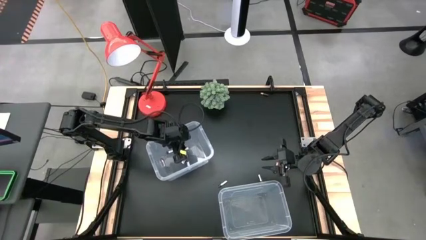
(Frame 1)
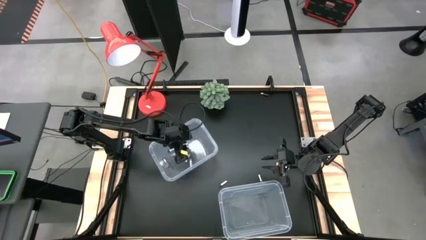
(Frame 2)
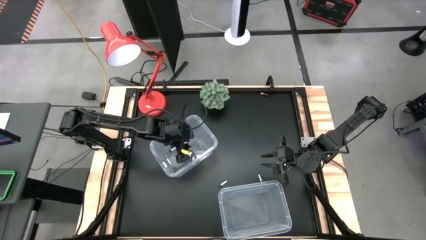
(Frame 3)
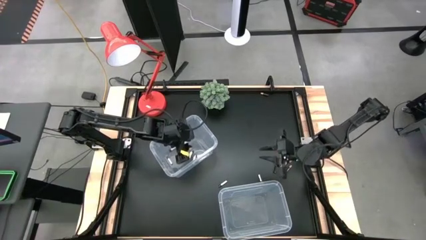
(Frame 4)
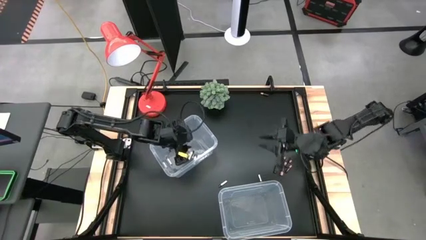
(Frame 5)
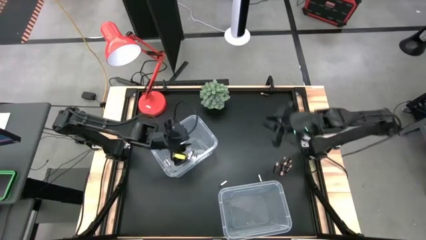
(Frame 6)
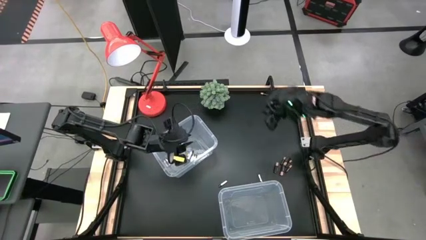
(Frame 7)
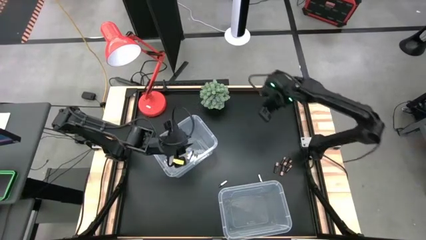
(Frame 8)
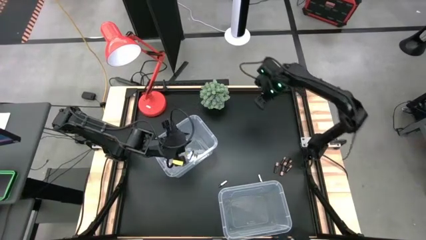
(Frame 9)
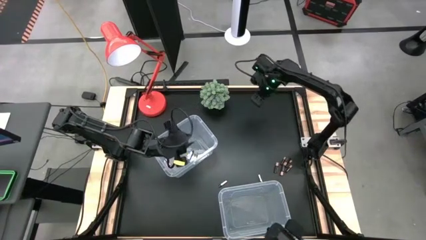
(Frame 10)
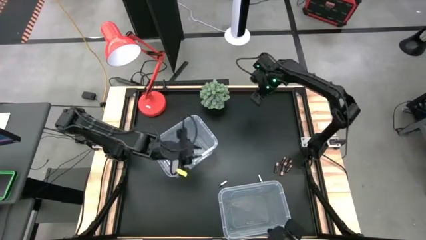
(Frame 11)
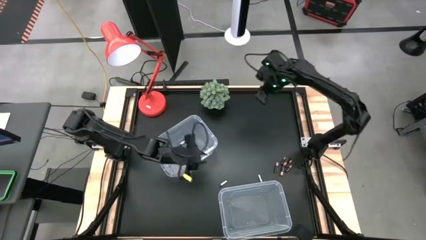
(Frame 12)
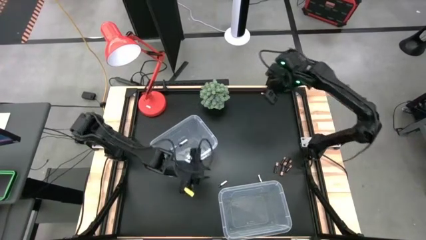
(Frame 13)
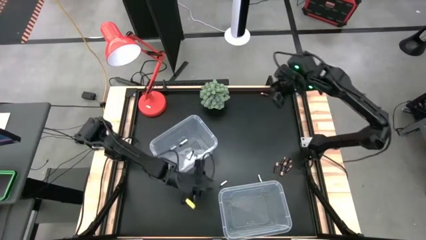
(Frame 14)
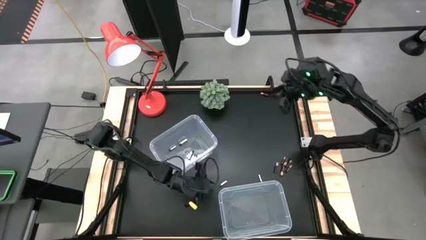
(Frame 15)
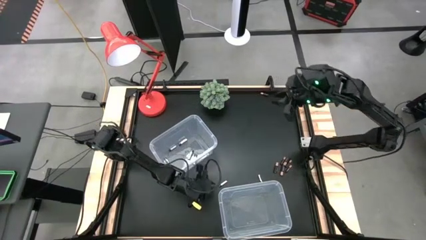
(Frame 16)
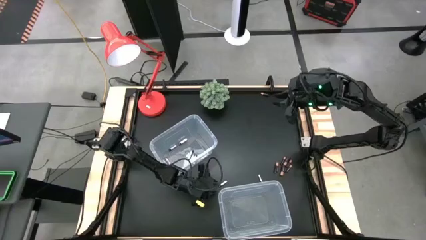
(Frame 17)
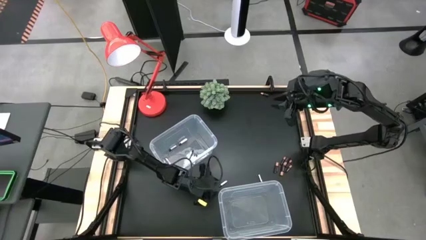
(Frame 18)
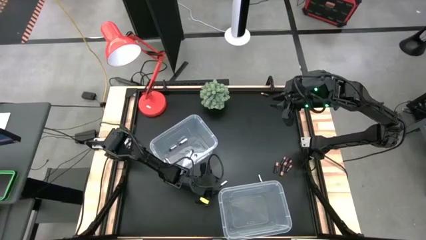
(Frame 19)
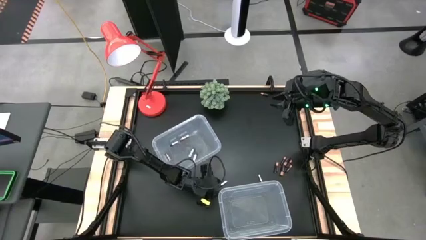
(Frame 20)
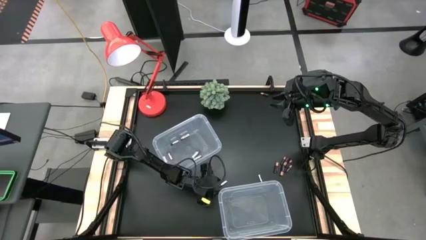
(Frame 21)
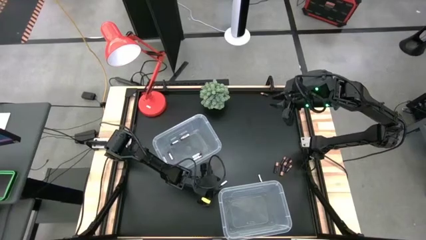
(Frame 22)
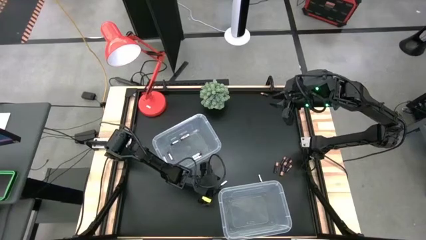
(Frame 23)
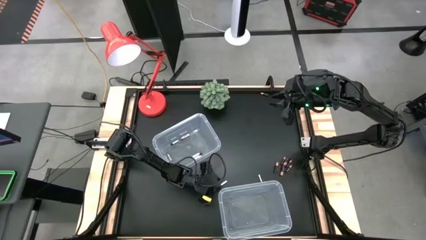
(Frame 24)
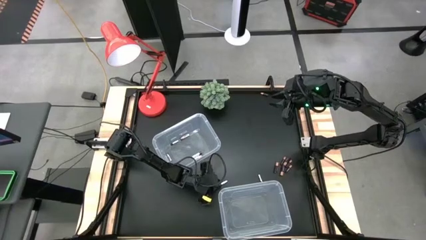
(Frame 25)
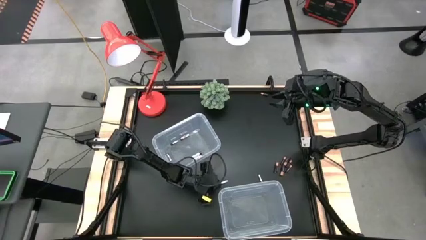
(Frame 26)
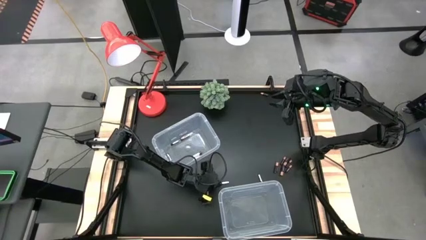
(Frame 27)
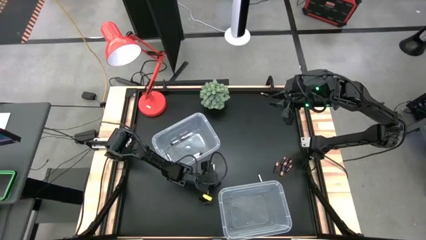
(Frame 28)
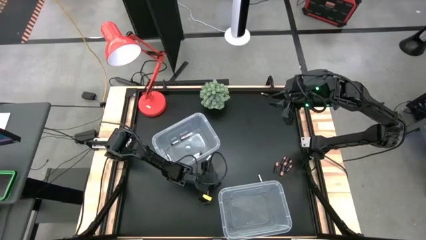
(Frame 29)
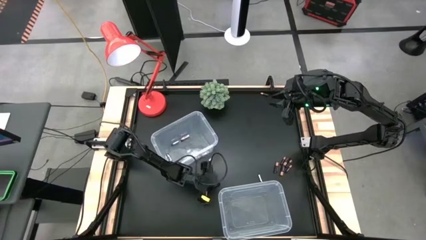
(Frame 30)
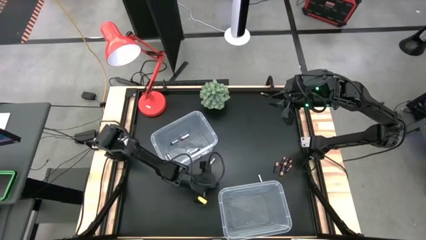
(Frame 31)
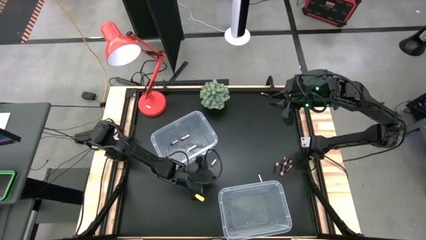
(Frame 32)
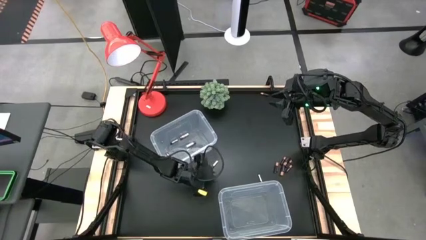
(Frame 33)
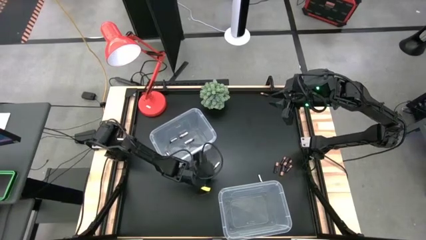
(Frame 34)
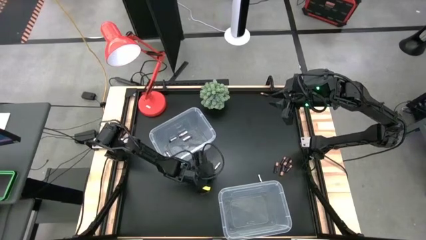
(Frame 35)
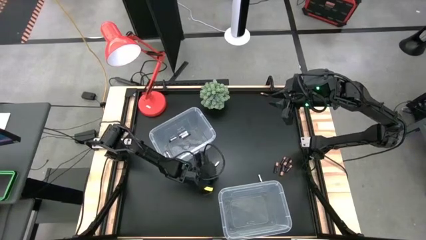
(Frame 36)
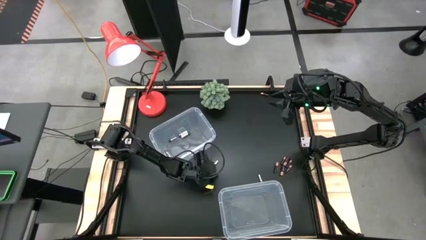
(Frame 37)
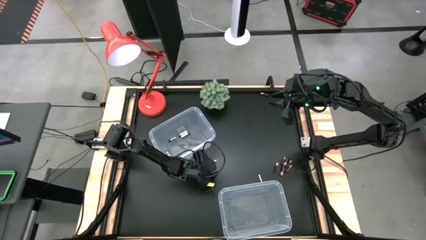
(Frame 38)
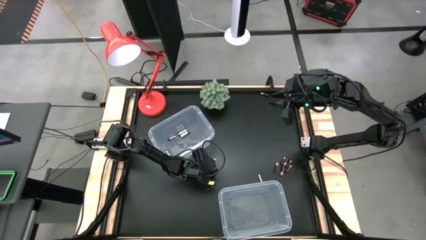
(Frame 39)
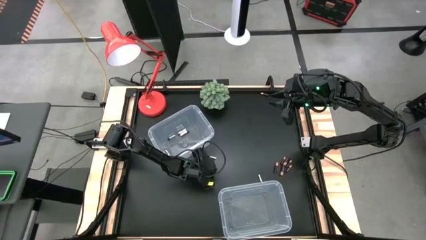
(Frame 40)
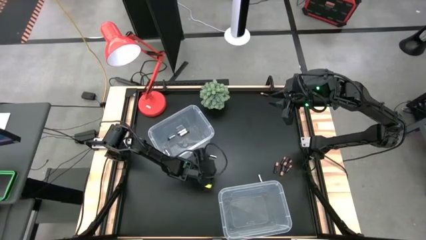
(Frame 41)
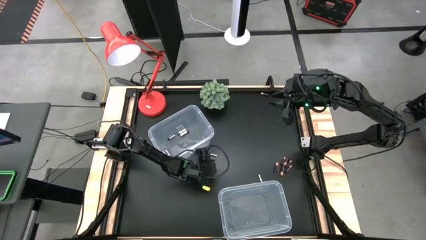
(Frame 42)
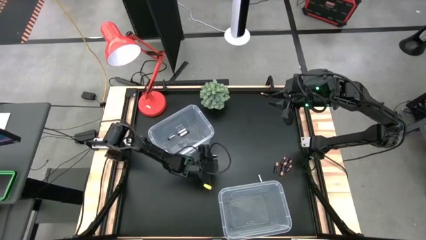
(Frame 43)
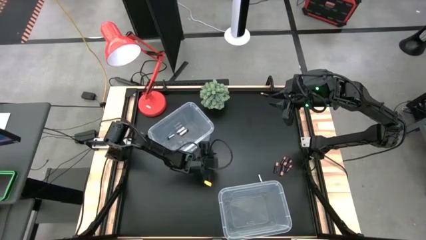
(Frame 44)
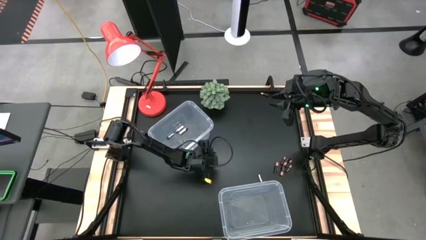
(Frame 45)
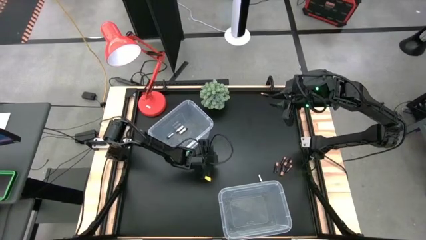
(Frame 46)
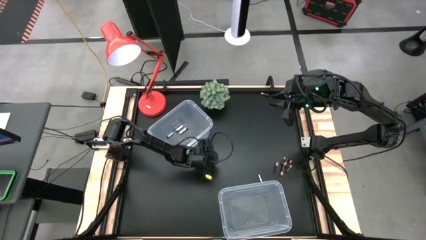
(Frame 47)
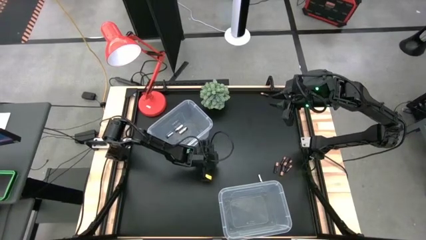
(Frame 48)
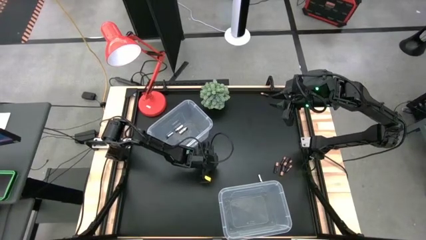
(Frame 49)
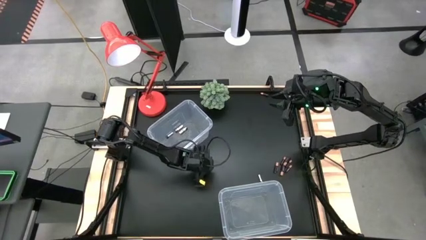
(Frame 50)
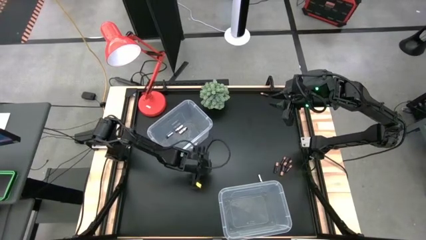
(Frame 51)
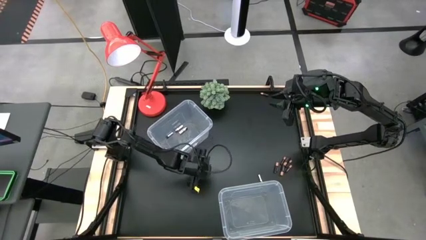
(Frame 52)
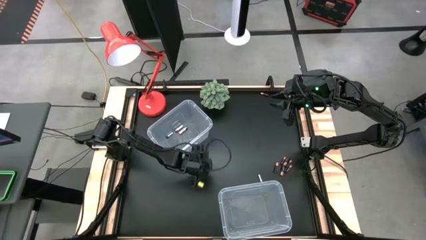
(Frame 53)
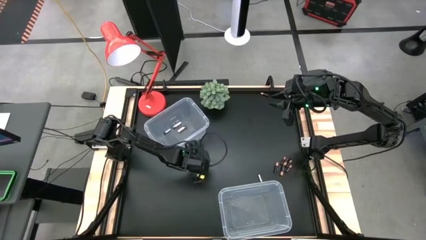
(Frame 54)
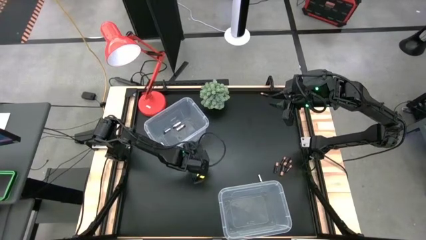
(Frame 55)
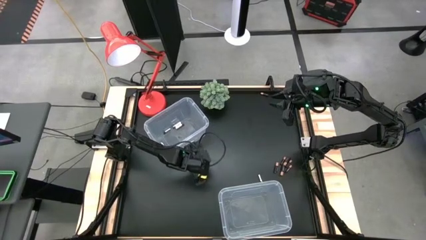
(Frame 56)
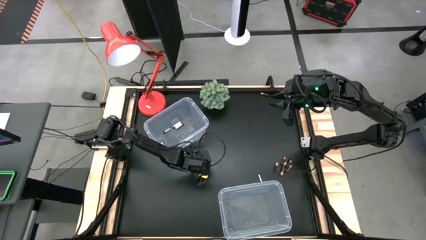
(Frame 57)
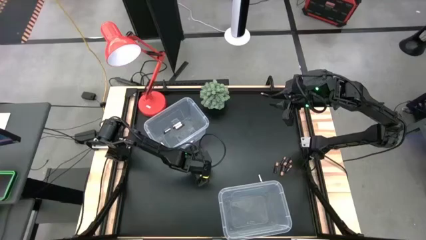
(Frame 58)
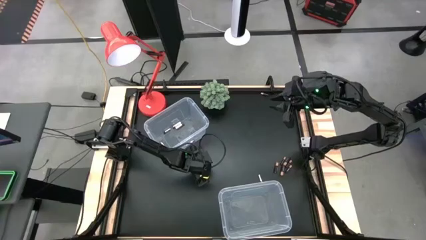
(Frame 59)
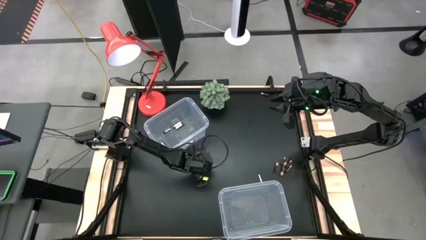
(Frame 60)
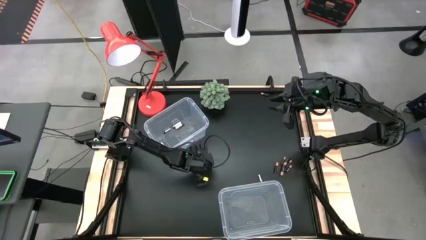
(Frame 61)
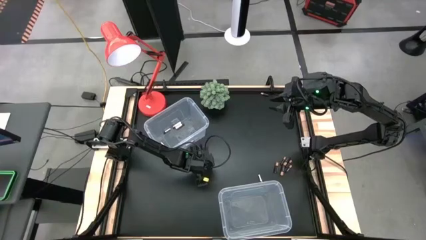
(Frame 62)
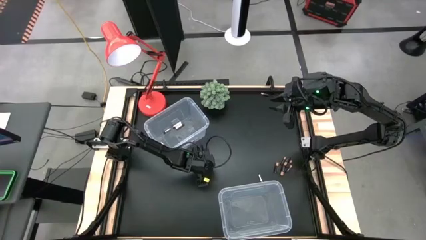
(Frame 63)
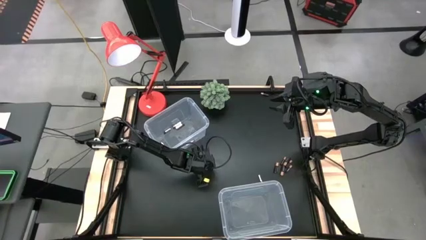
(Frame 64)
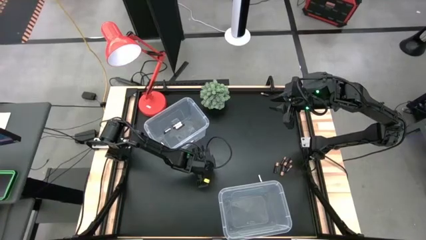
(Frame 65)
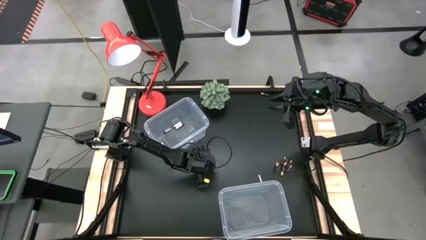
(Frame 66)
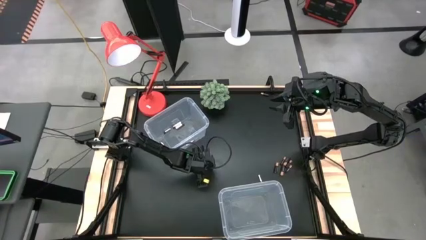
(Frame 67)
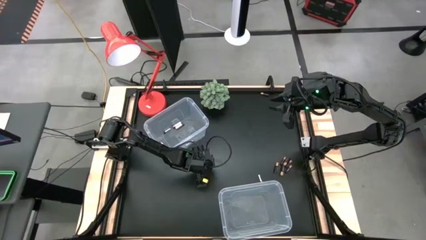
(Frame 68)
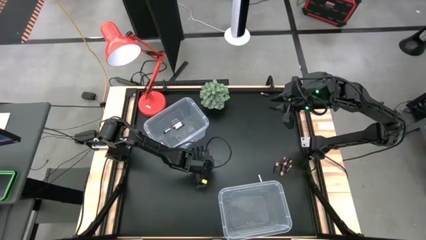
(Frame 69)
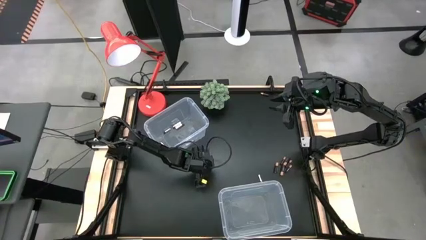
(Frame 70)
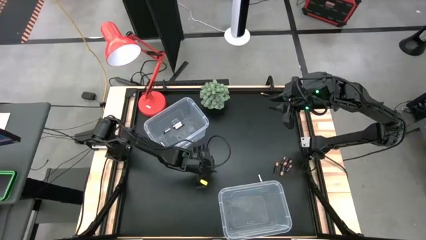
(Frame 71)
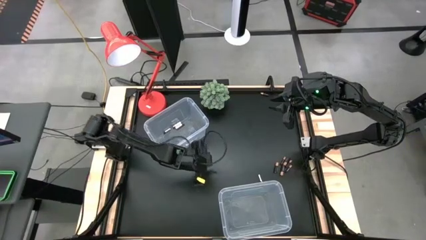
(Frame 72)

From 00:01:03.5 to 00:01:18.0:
Task: Sort batteries
Put the silver battery into the top transparent bin

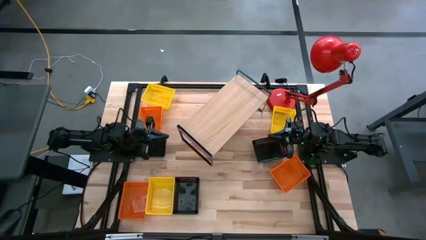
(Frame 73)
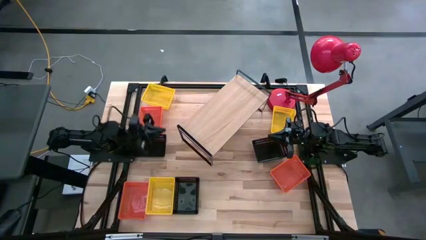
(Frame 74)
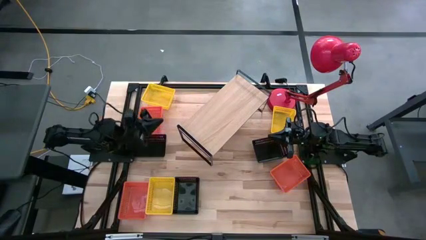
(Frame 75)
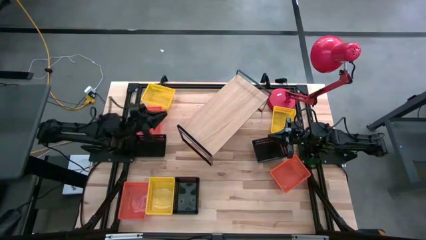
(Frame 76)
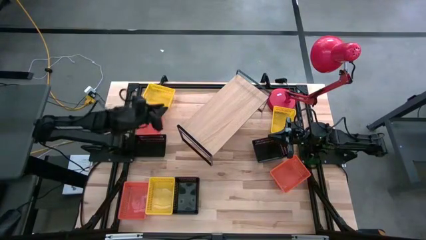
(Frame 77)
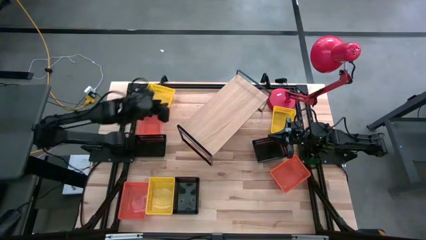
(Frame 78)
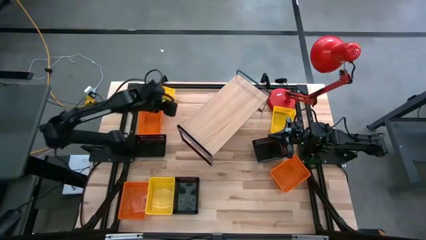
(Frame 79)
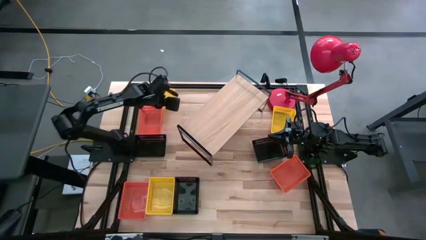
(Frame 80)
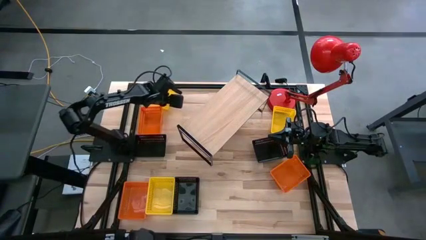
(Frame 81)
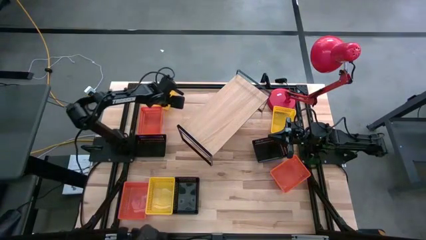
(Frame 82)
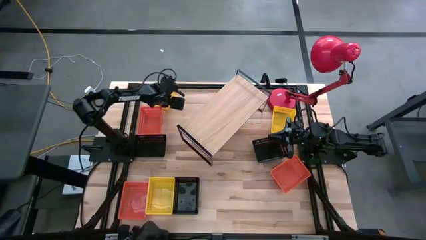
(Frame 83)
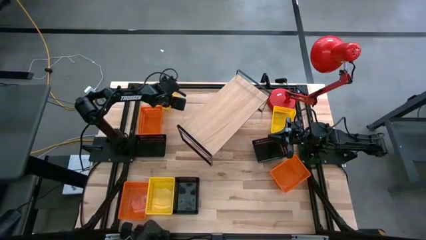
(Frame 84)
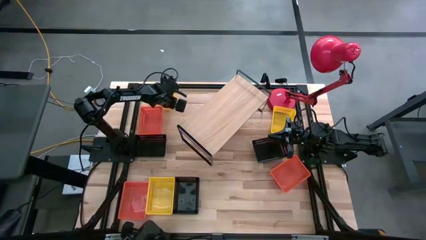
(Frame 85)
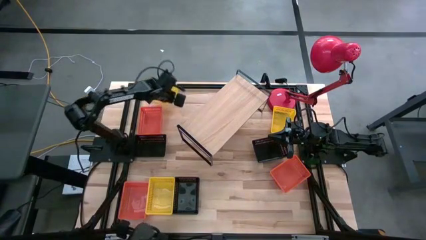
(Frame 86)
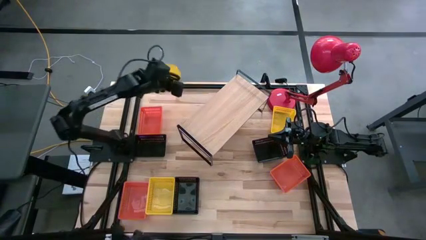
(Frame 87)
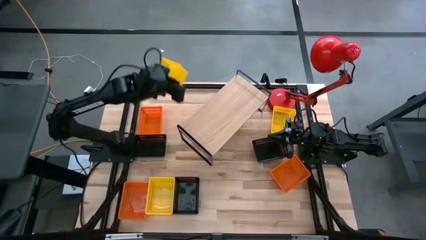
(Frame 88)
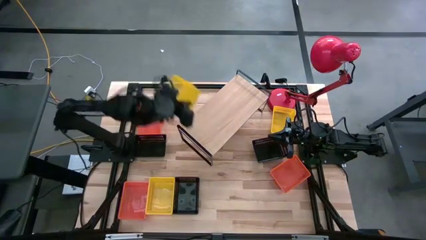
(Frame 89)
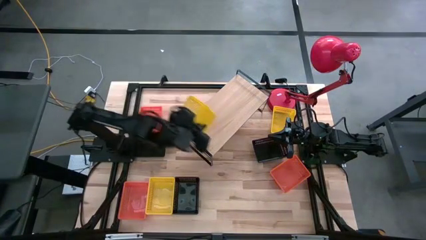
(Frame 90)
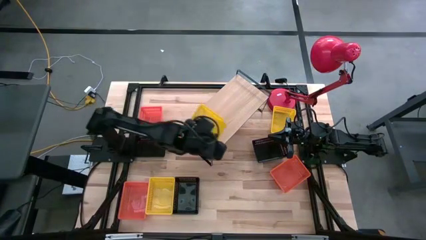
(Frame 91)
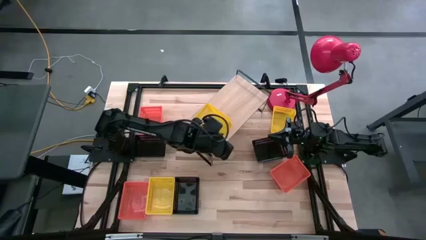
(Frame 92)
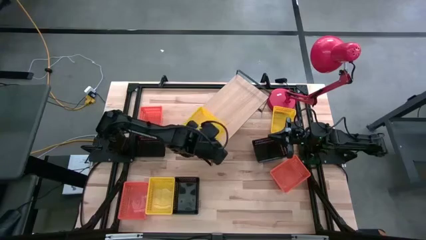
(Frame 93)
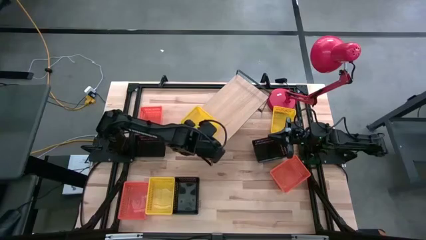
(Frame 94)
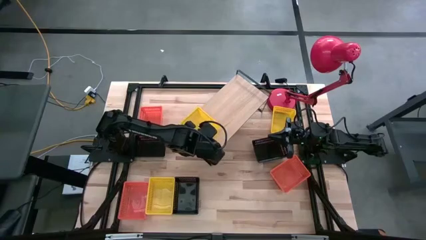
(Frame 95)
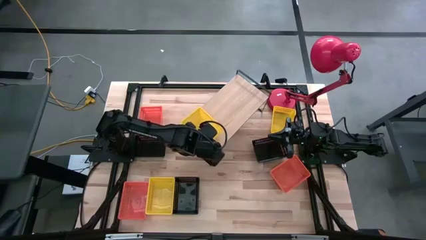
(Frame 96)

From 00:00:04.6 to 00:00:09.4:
Task: Stack baskets on shelf by color
Put the top left yellow bin on the shelf
